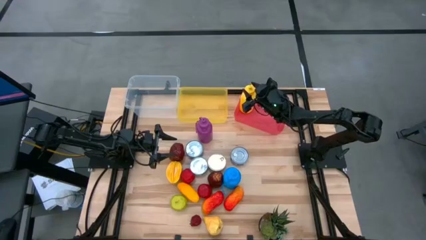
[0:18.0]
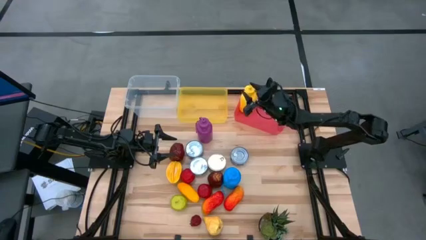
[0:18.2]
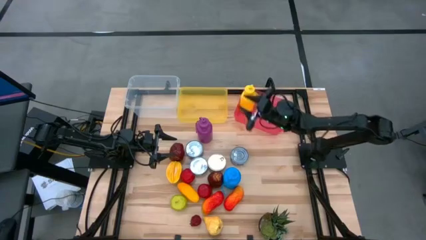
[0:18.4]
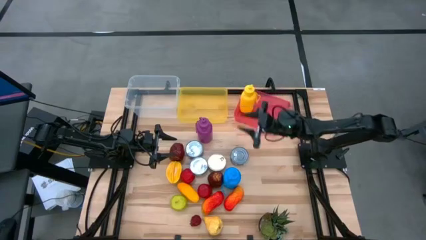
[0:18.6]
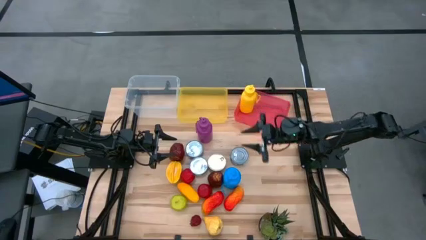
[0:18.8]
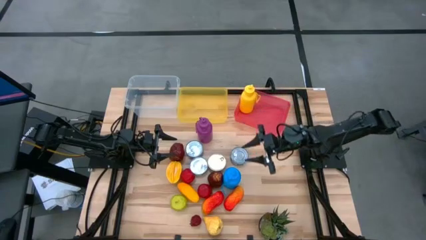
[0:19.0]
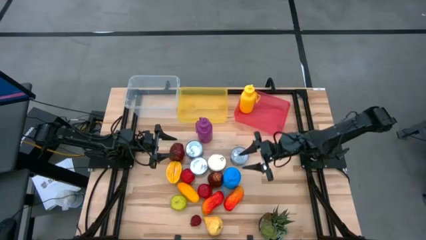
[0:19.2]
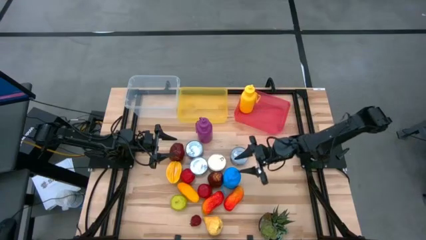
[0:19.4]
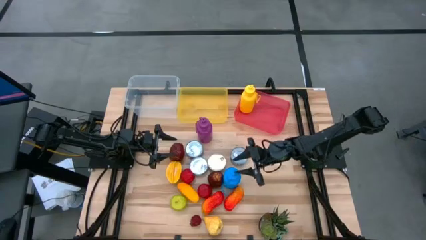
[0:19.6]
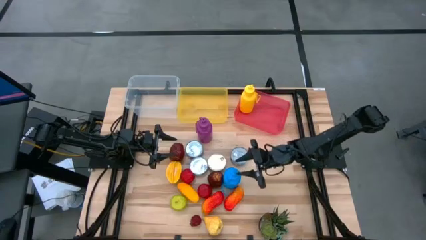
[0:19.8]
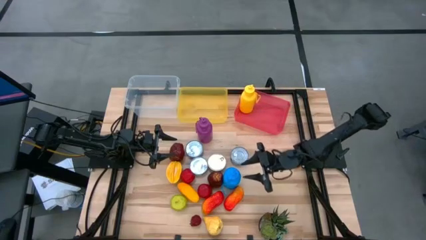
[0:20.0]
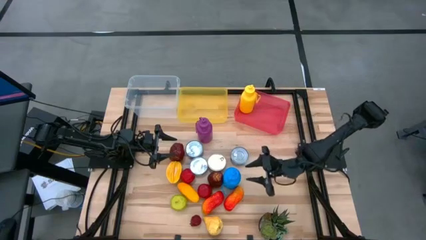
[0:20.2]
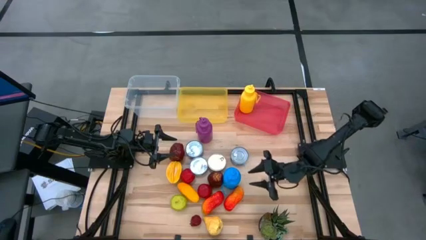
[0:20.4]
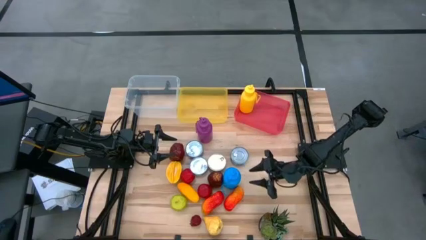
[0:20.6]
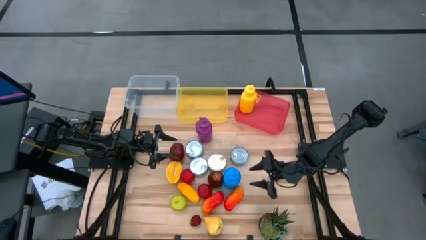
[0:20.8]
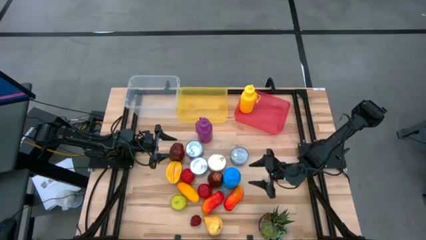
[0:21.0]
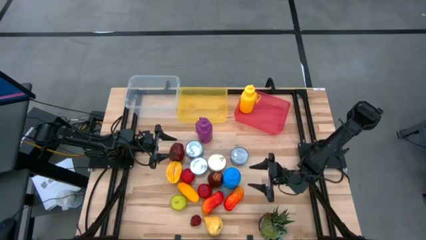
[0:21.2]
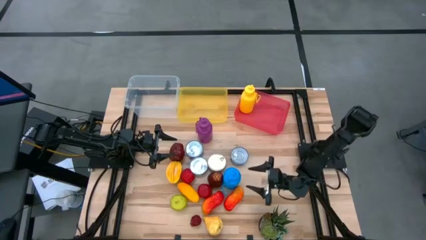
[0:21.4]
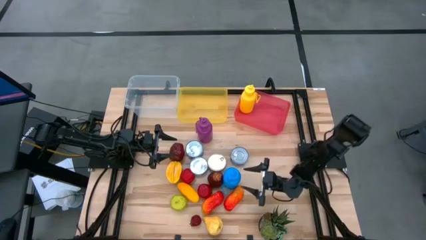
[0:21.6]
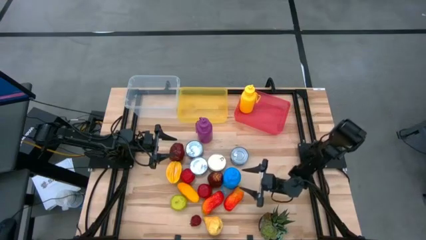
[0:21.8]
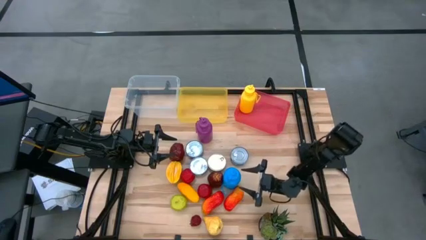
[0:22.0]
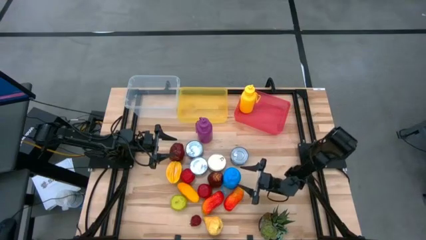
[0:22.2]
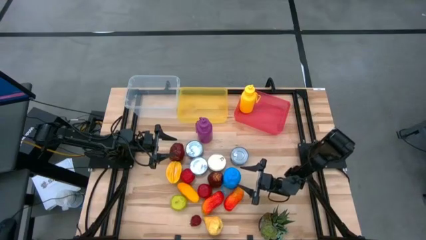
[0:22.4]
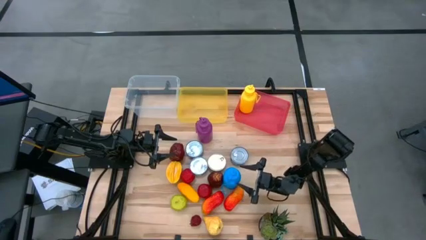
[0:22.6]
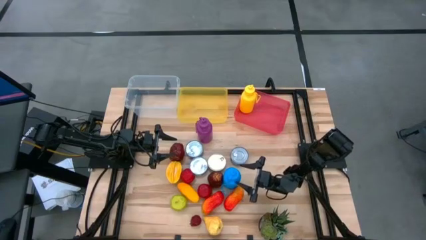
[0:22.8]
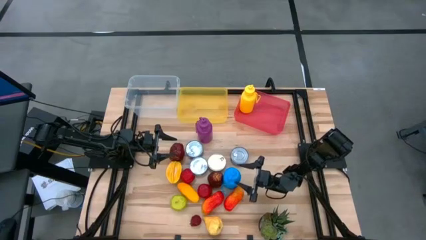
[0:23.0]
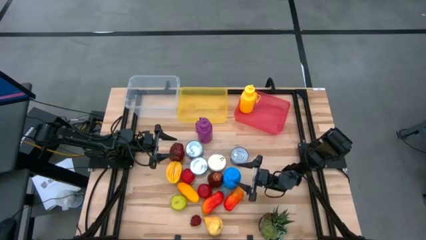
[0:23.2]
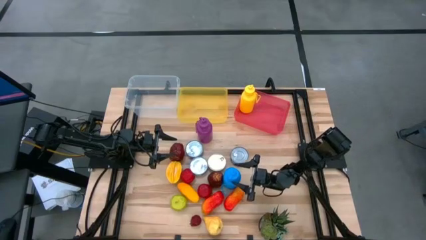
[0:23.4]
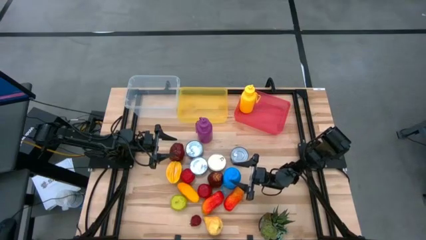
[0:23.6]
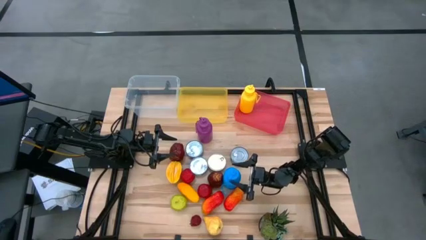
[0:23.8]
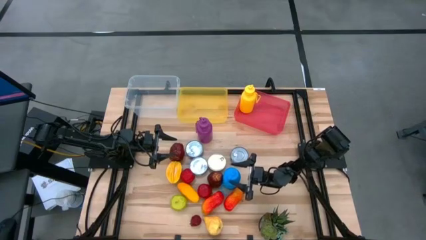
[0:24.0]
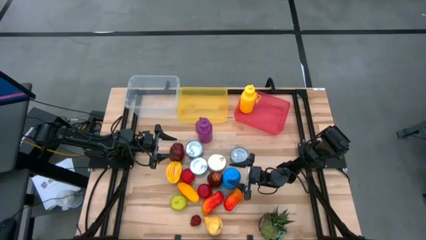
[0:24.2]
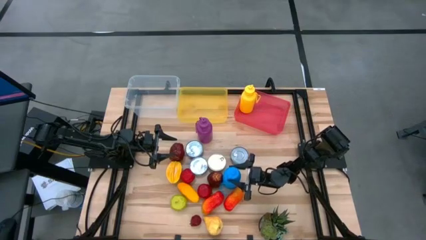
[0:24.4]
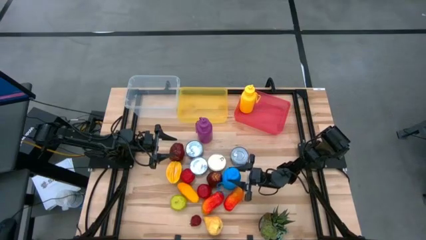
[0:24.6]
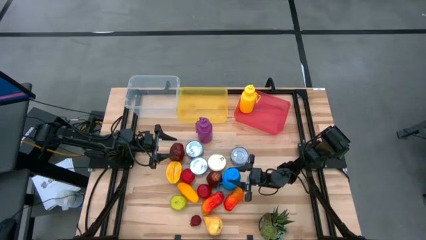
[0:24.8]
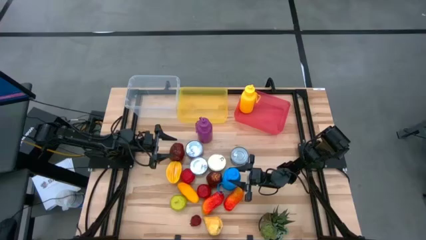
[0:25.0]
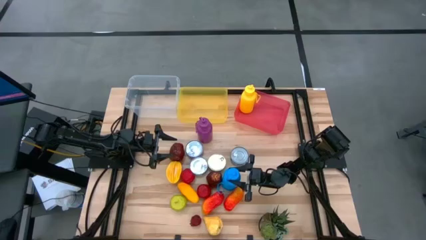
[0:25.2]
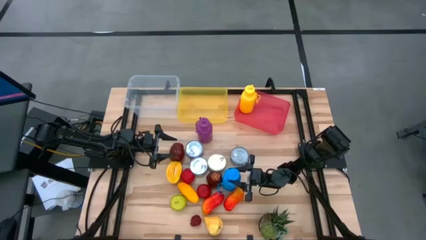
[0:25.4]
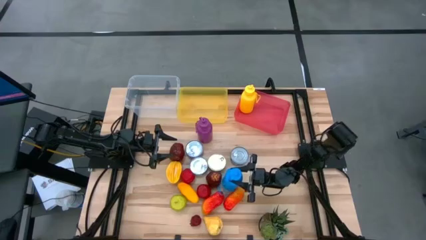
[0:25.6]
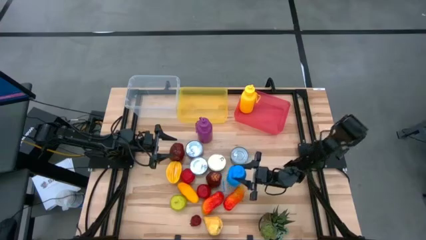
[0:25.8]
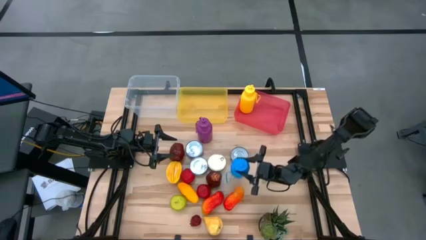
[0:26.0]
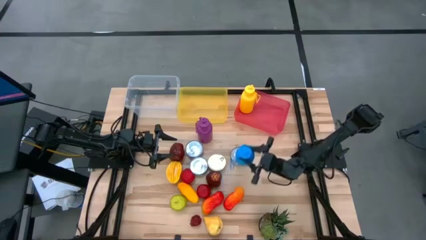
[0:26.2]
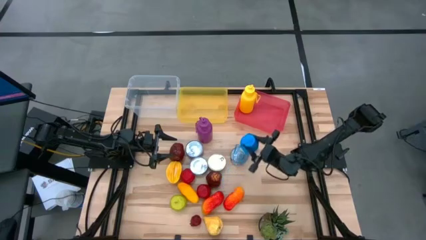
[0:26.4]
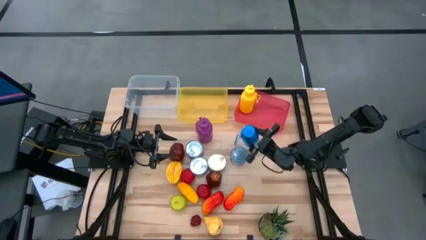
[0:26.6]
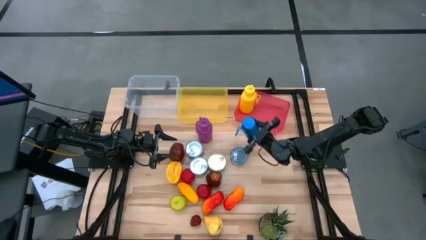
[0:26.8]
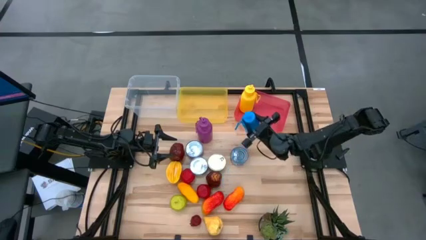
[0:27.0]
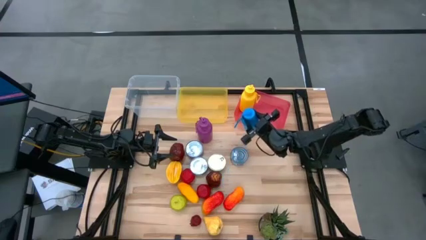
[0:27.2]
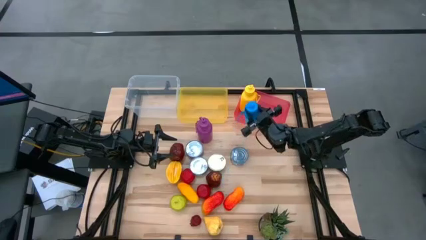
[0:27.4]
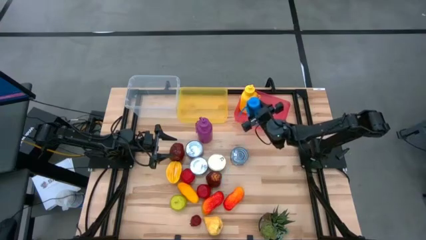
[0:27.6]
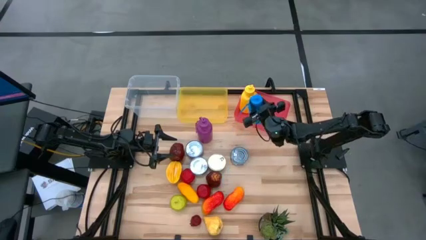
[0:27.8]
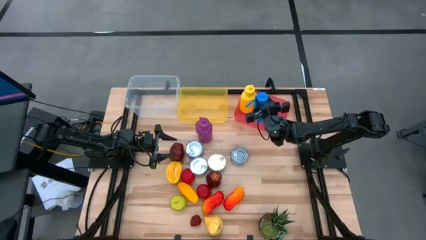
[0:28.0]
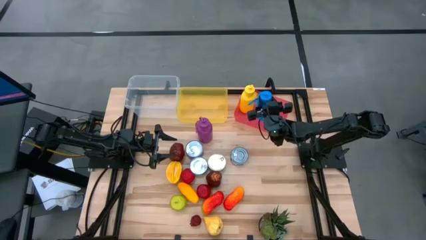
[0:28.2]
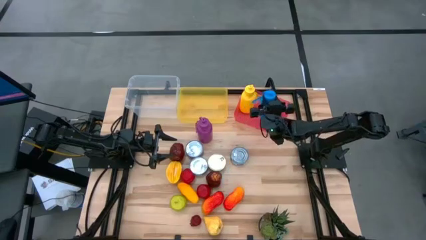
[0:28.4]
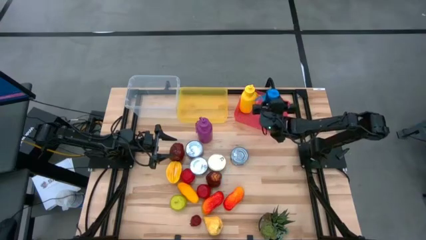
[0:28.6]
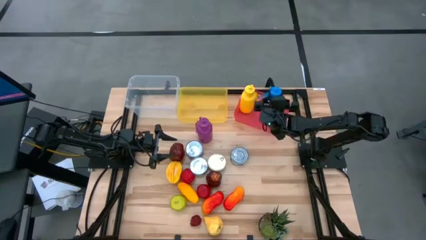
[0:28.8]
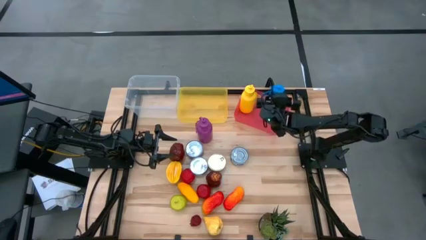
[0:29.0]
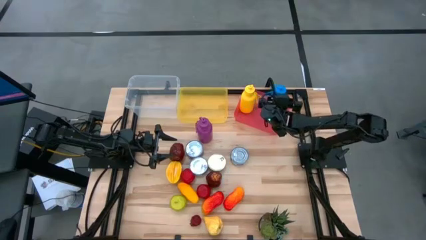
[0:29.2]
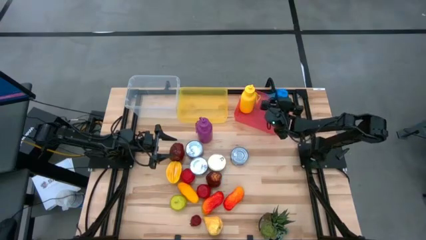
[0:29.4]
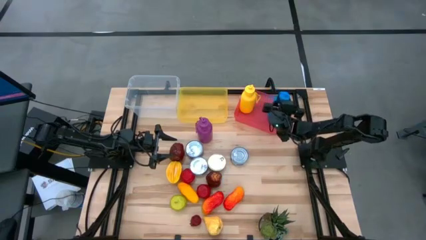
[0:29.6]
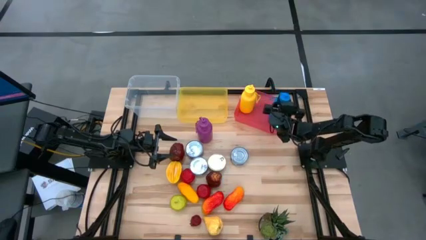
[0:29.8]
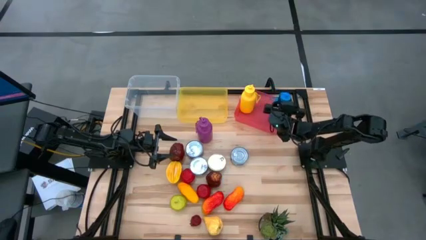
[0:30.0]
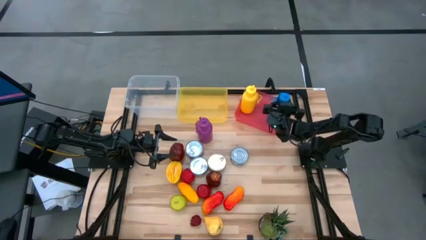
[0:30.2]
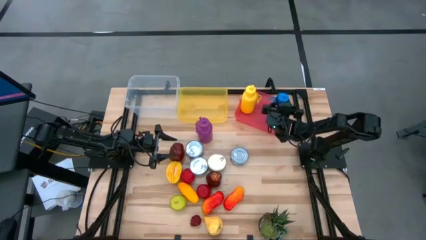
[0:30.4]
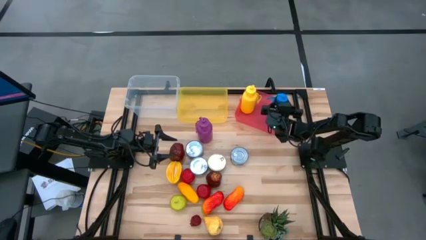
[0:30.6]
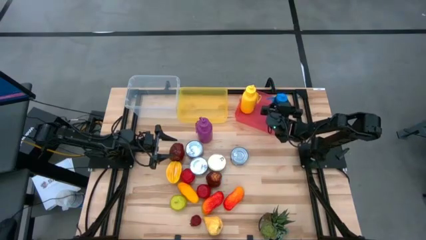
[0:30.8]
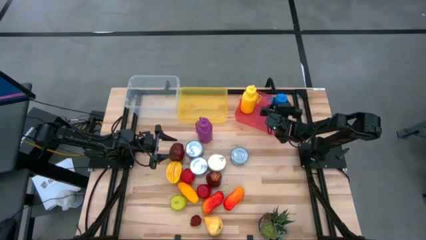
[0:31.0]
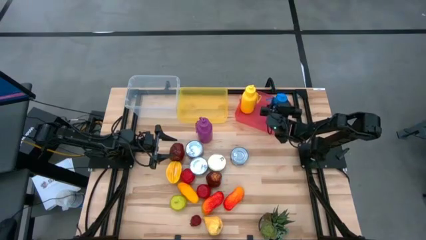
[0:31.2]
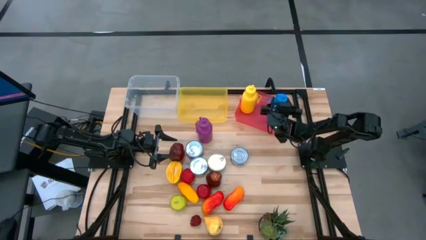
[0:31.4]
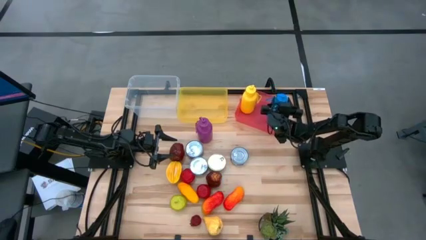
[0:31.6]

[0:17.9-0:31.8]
Task: Pick & Place Food Item
Put the blue water bottle into the pink bin

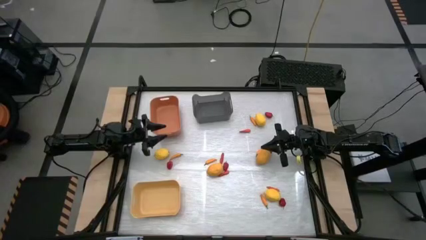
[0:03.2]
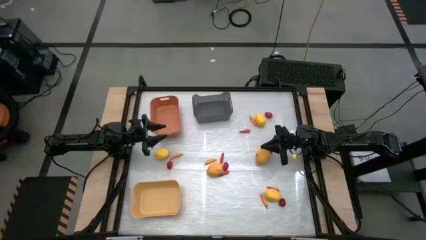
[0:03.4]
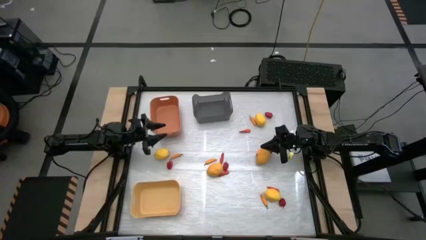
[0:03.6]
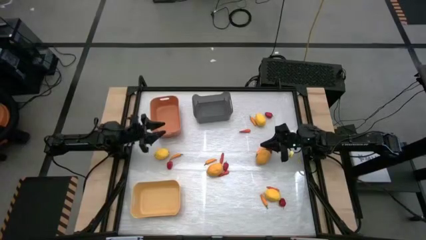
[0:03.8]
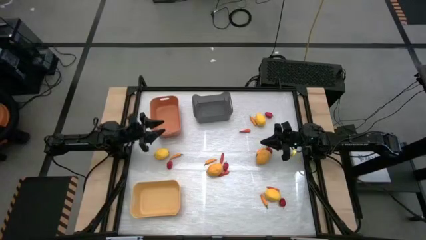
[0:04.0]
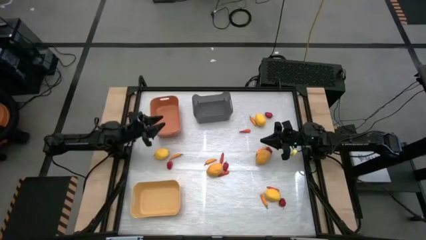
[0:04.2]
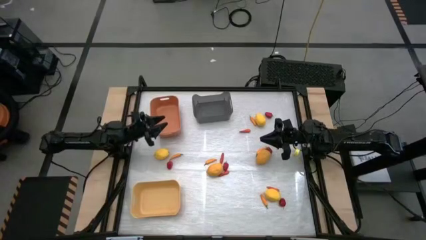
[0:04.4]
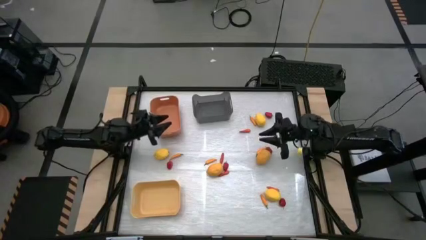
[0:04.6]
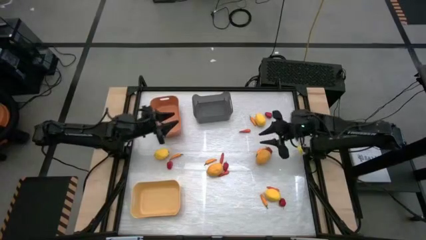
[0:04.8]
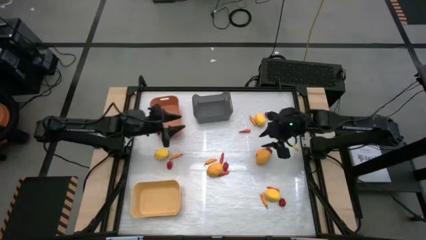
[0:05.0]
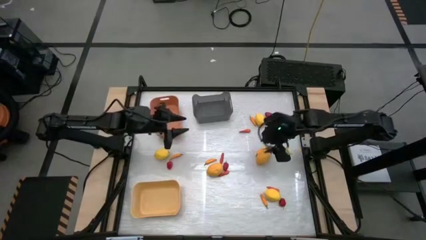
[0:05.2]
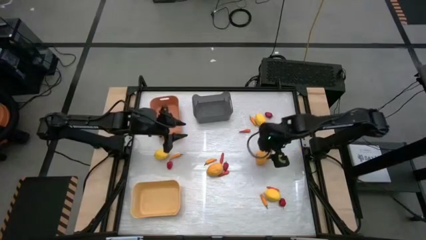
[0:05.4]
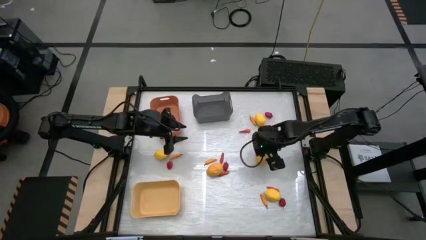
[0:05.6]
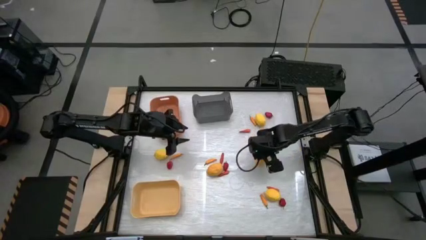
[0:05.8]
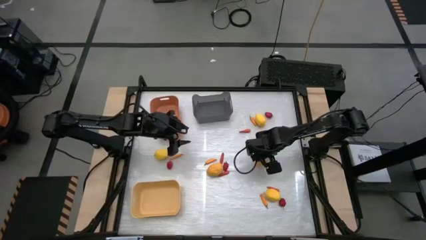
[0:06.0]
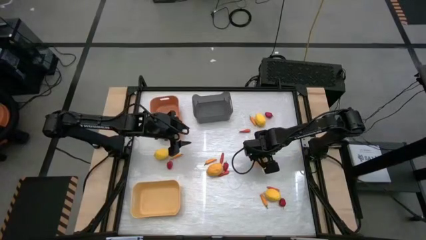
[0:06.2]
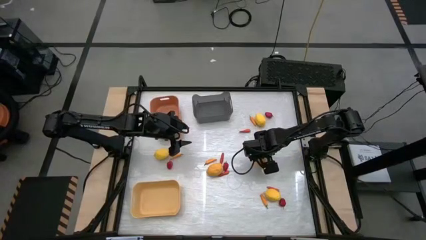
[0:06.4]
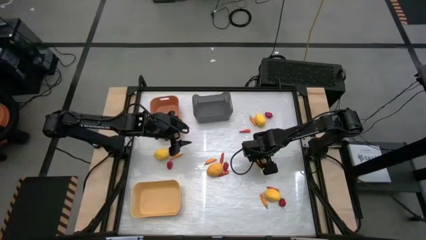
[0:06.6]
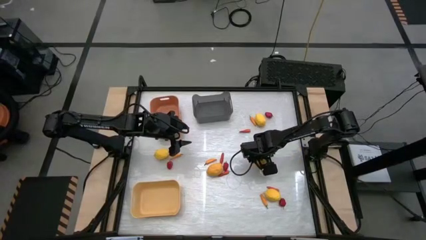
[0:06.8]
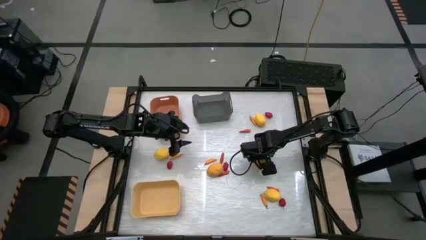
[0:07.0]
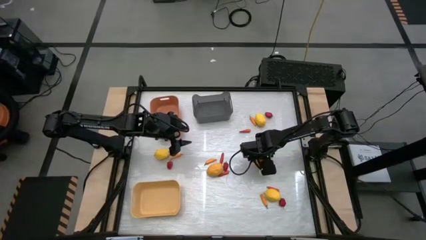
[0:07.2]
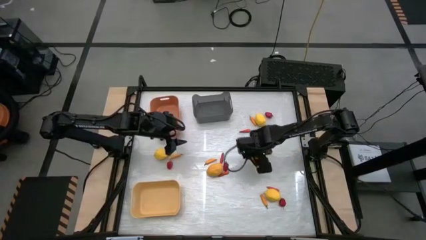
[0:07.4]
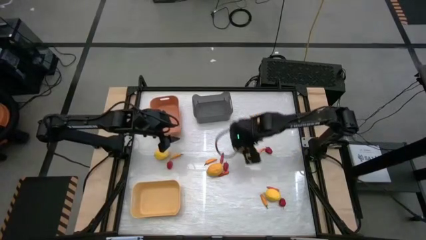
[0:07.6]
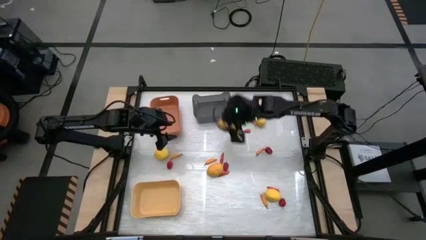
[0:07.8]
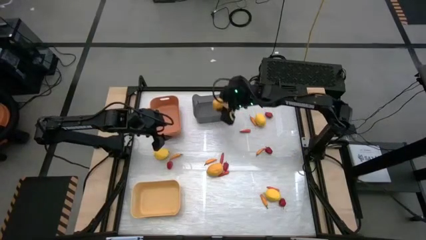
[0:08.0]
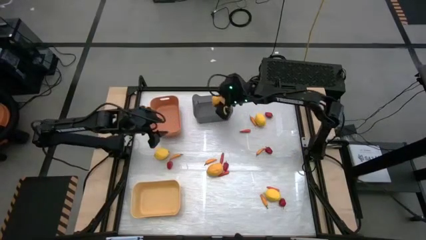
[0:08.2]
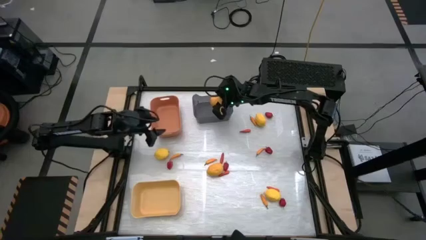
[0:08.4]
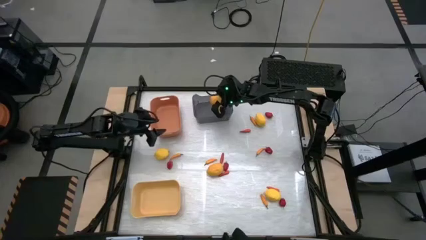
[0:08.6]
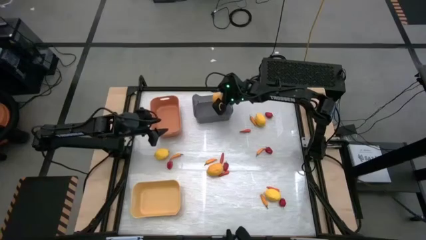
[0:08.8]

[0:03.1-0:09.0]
Task: Sort produce into baskets
Put the yellow lemon into the black bin
